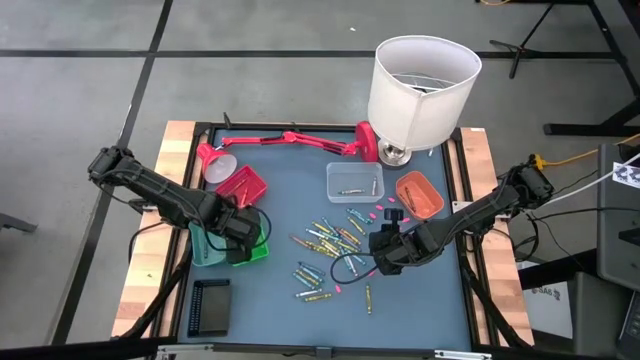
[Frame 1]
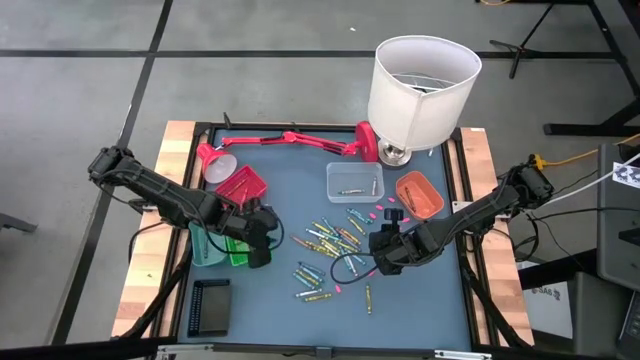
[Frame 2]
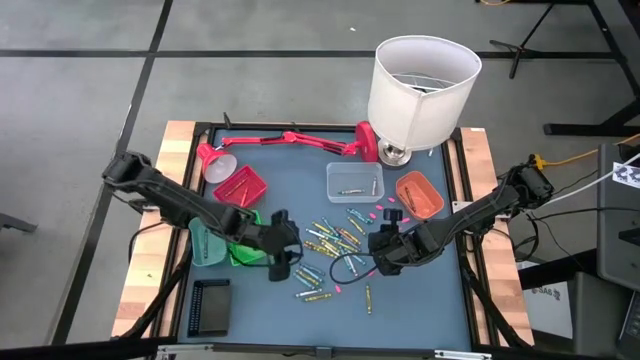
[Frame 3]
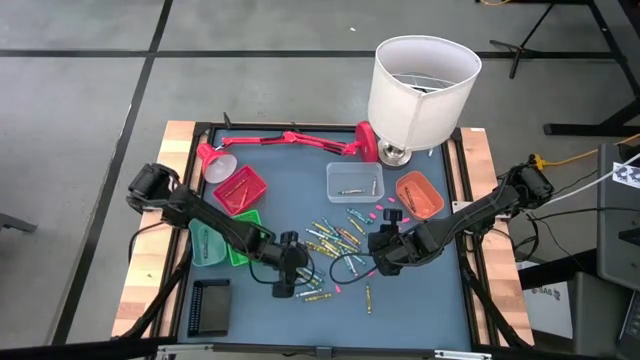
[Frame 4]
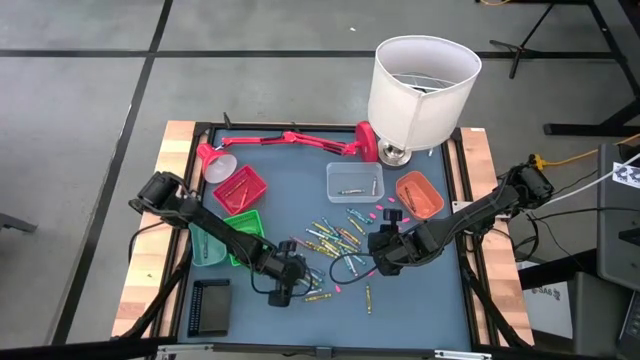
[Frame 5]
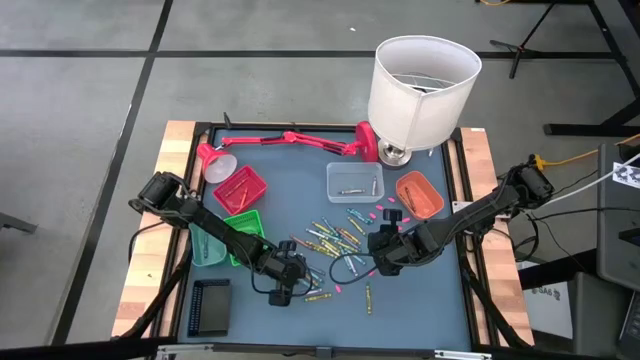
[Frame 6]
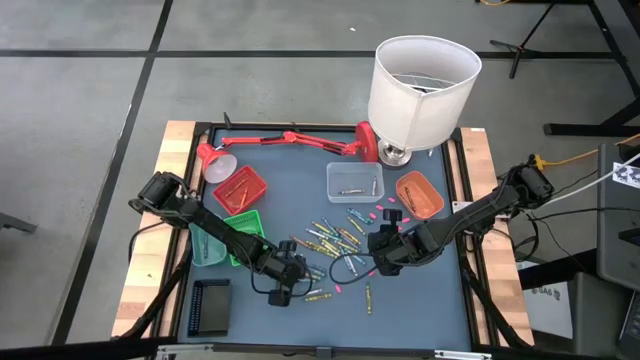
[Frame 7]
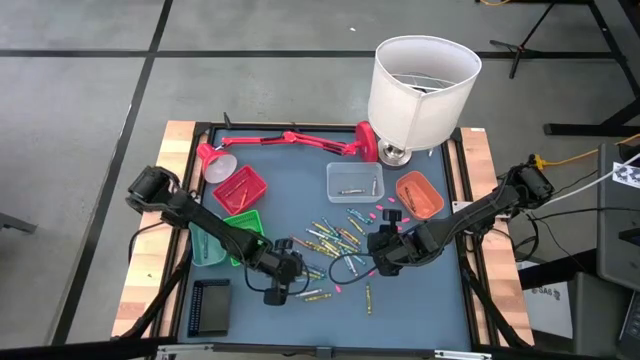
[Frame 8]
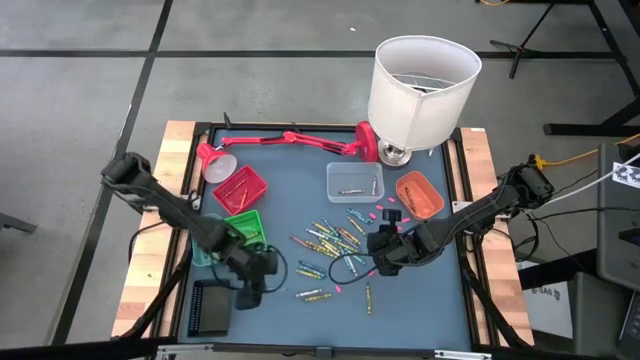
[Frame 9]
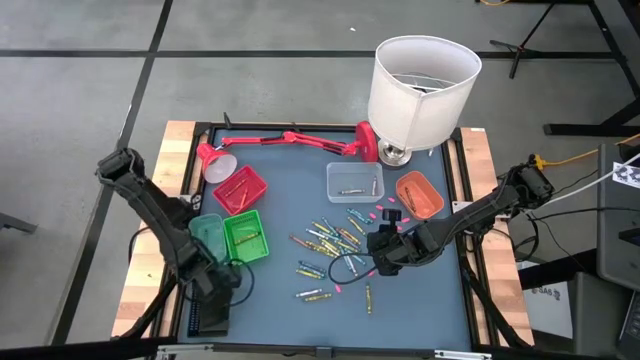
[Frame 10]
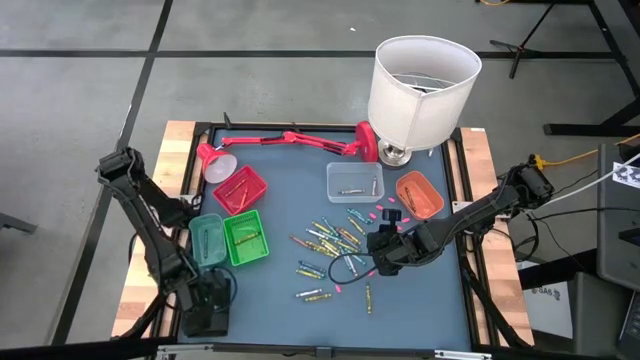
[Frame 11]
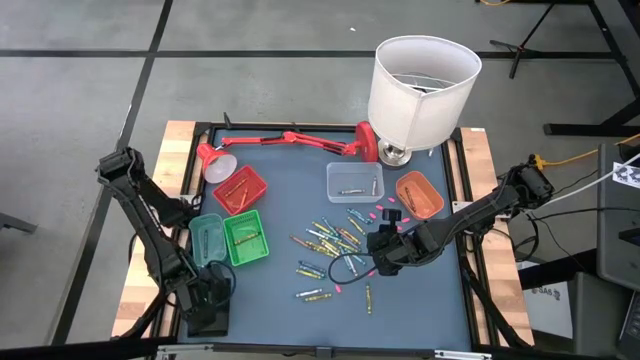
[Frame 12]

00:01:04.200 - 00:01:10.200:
Task: Sort crayons
Put the dark green crayon into the black bin

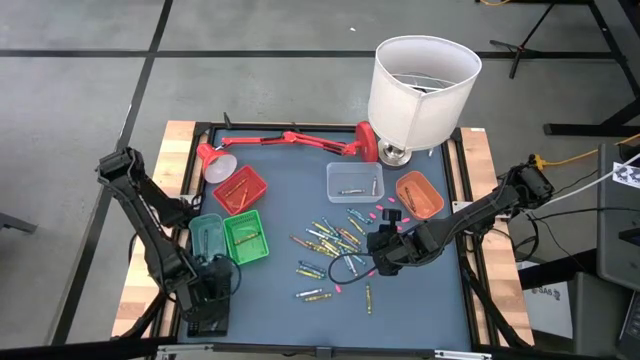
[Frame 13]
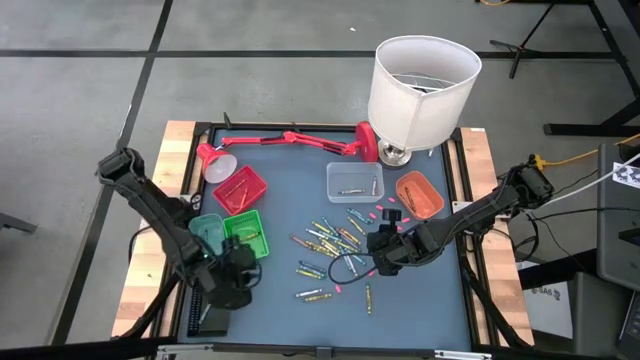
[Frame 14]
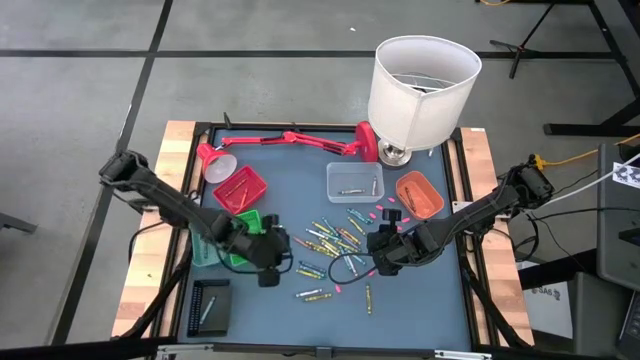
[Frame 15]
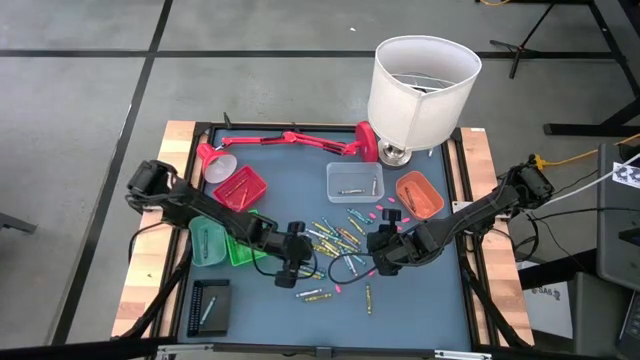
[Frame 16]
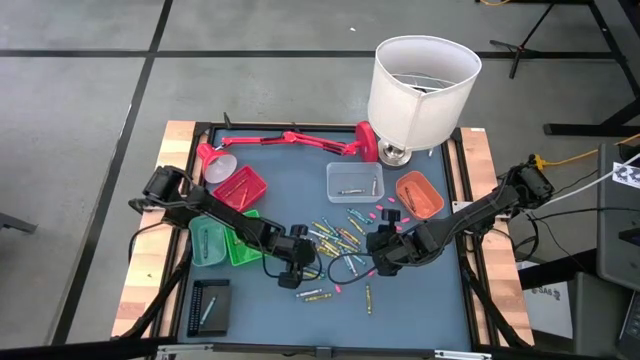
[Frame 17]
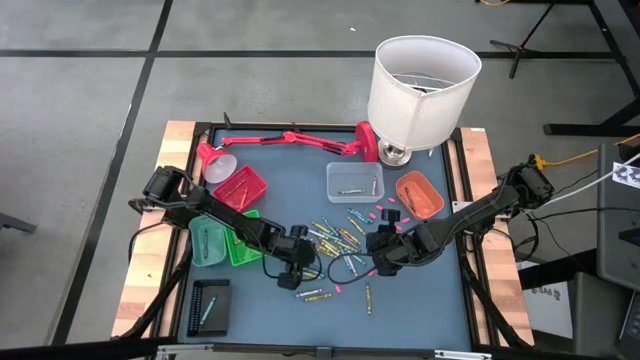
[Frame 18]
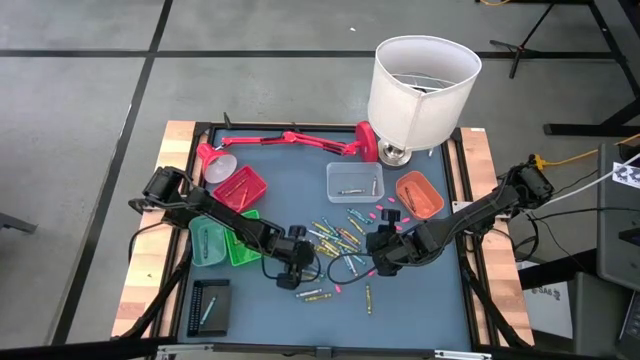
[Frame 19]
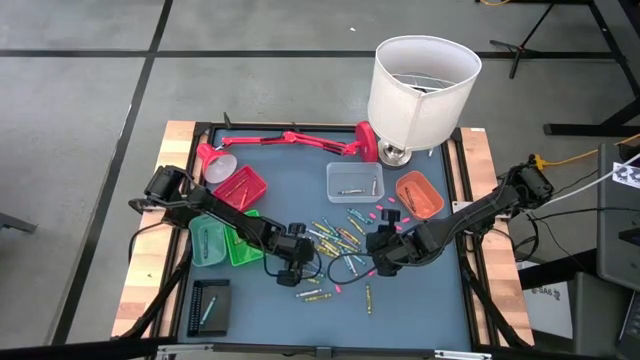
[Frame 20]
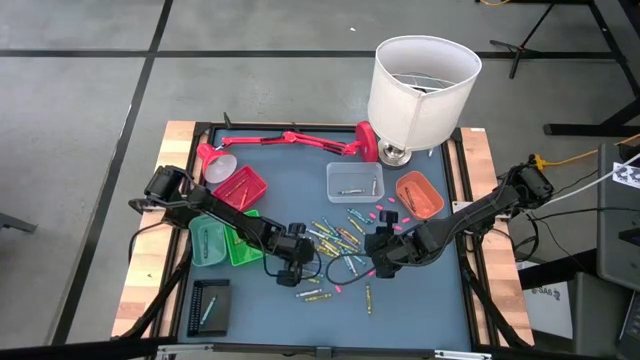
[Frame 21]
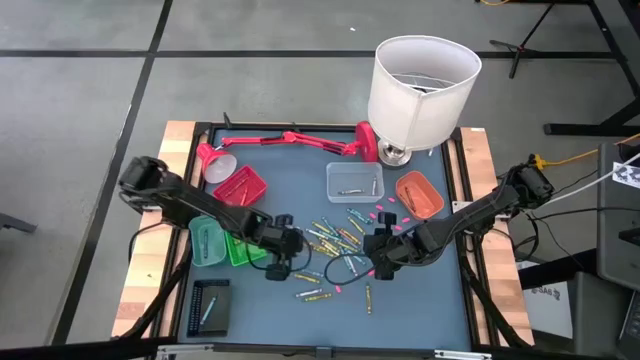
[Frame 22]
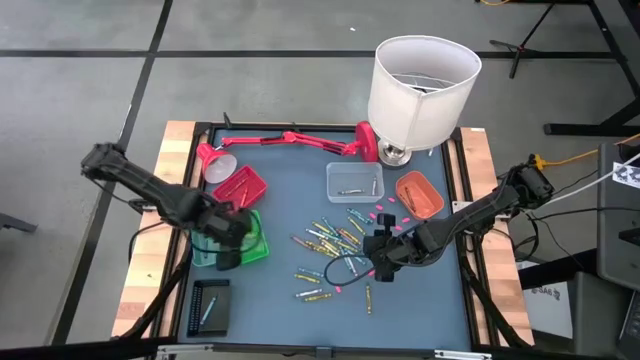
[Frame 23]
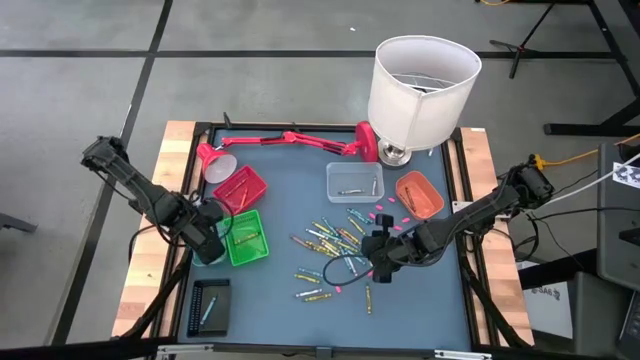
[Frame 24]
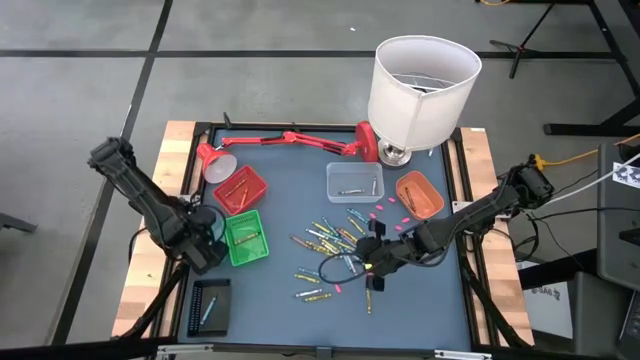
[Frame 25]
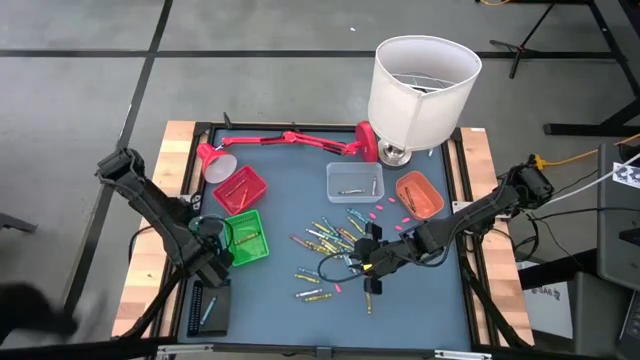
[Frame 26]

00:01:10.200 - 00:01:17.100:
Put the blue crayon into the blue bin

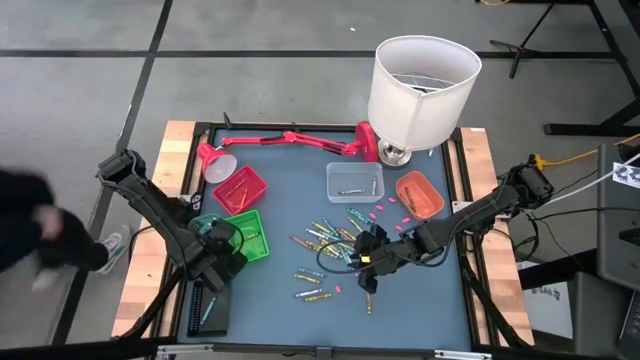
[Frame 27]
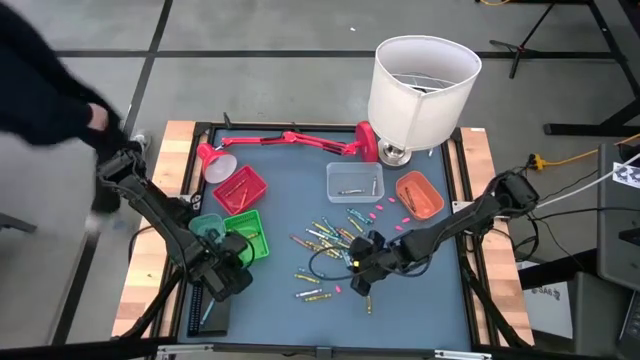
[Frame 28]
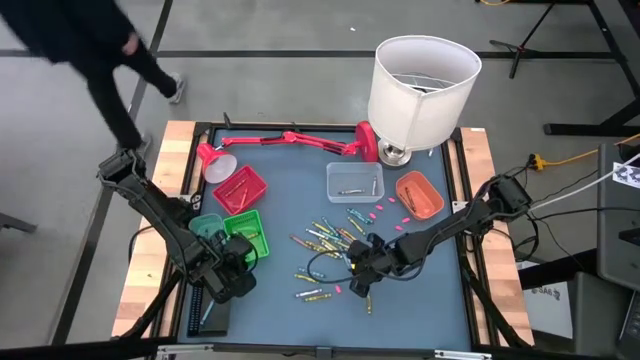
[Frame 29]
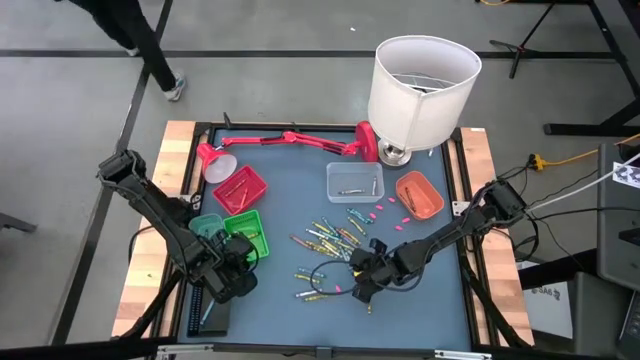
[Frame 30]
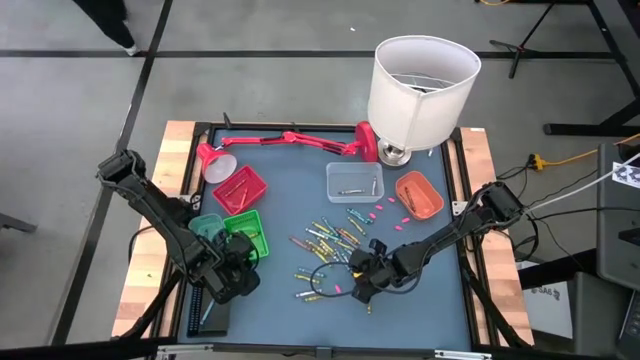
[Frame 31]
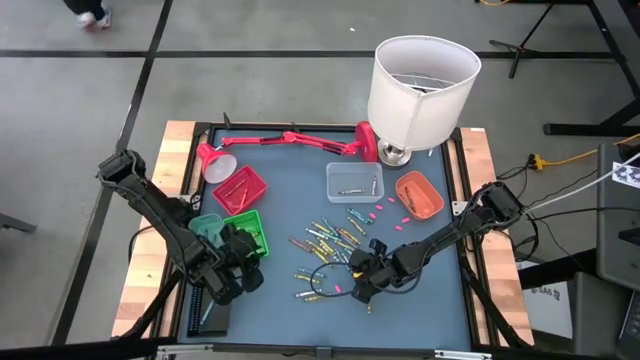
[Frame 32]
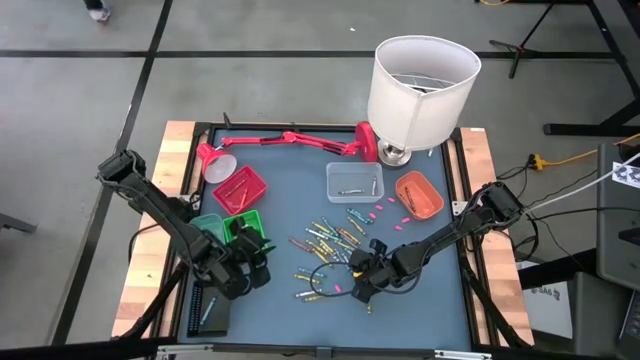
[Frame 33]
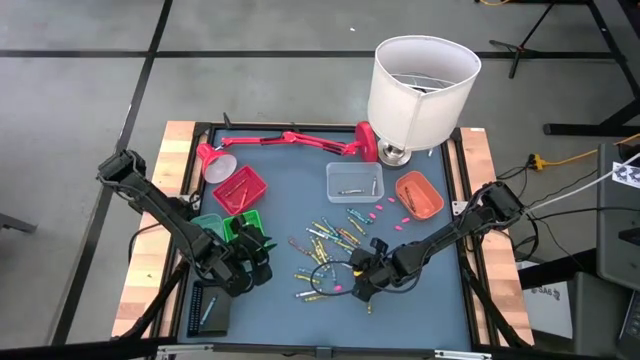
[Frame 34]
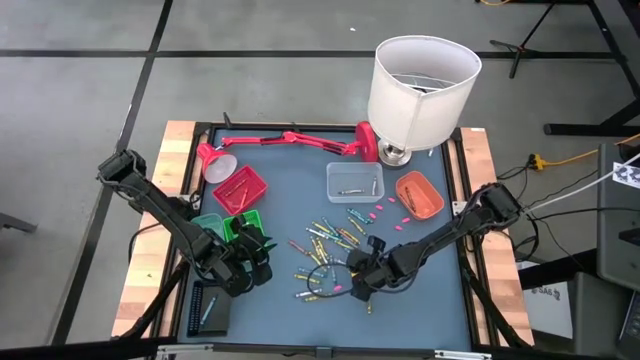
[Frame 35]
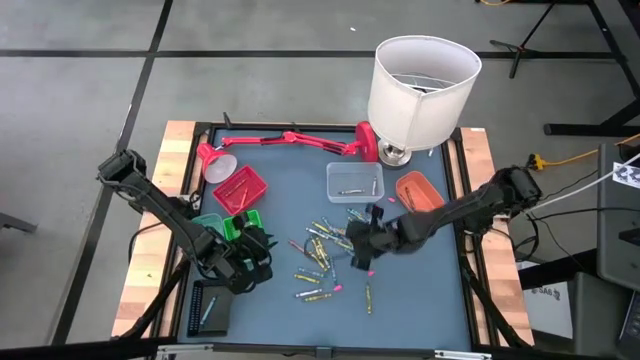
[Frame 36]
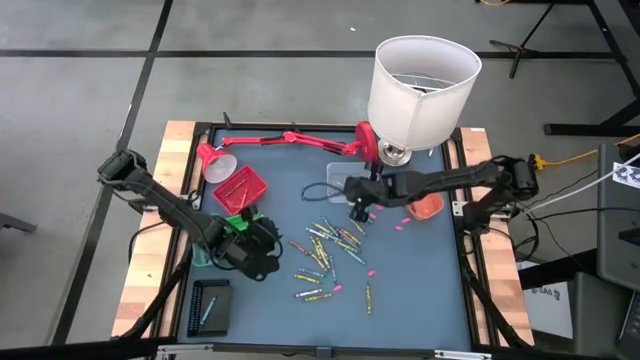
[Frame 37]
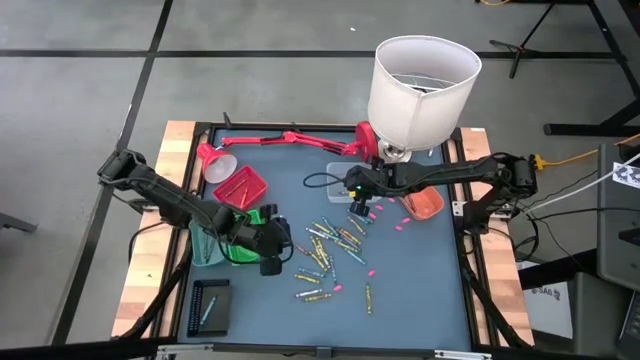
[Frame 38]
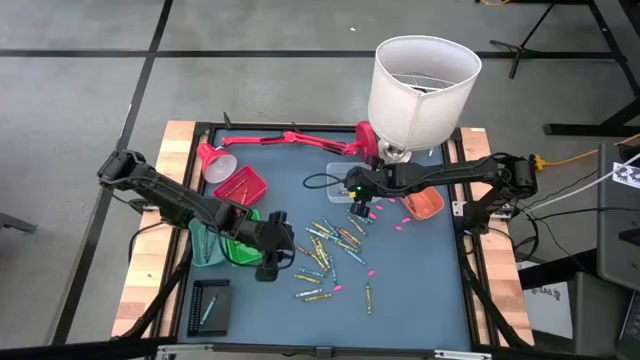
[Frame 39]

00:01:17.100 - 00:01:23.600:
Put the gray crayon into the transparent bin

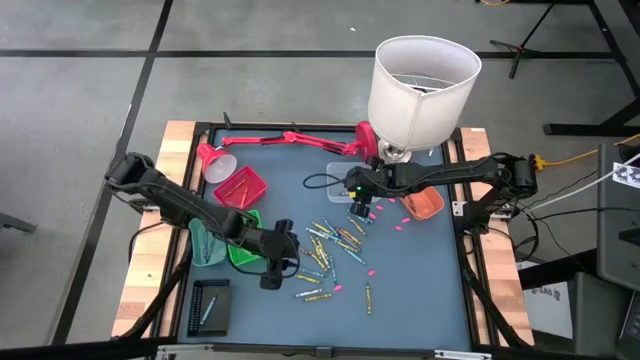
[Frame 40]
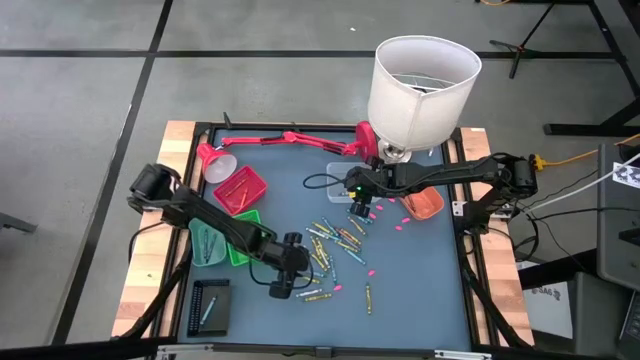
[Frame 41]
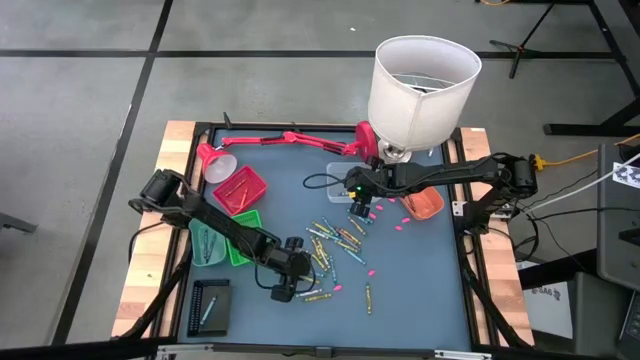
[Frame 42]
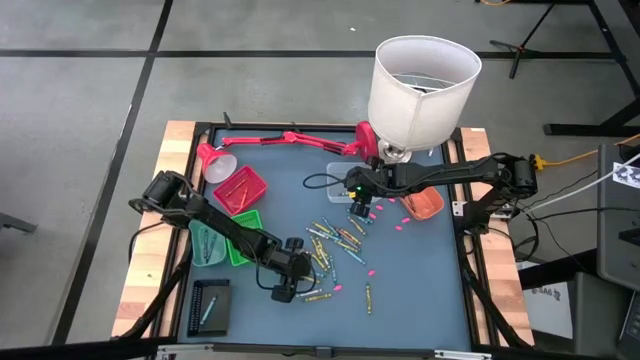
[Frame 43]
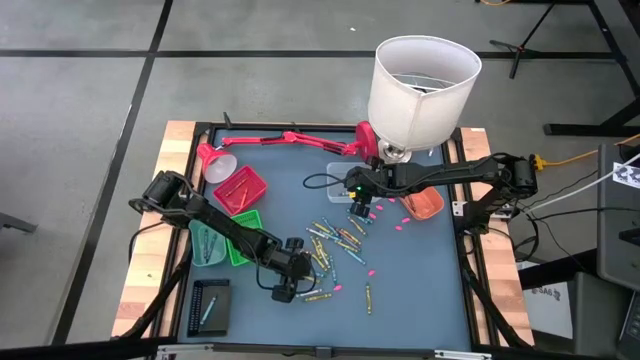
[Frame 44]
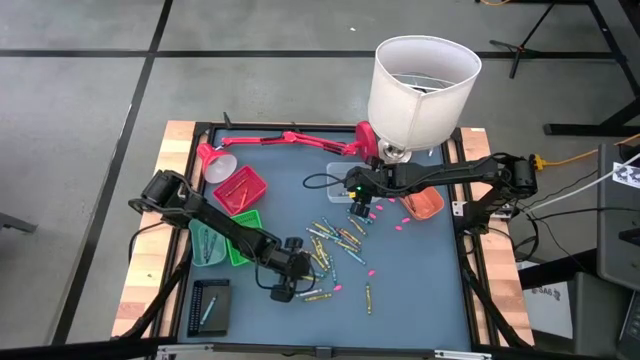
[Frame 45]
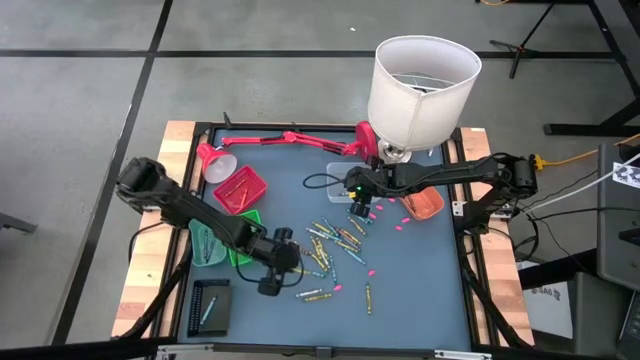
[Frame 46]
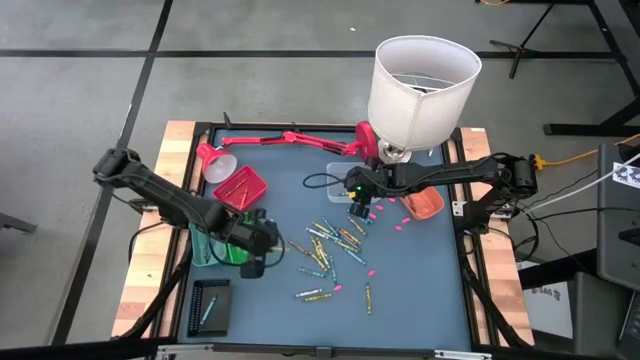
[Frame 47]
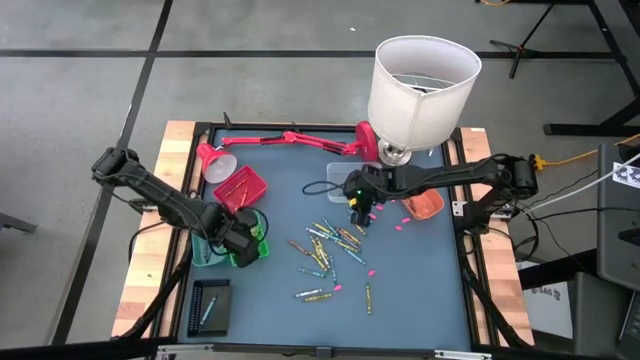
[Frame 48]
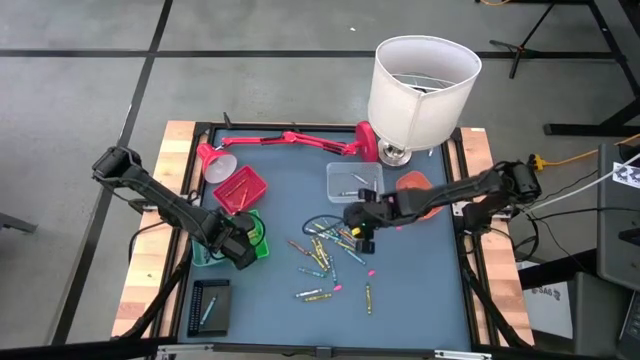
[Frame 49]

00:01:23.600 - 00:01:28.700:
Put the green crayon into the green bin
